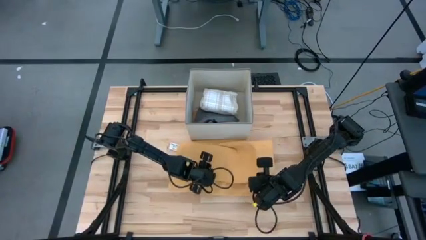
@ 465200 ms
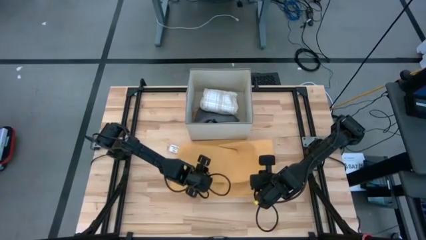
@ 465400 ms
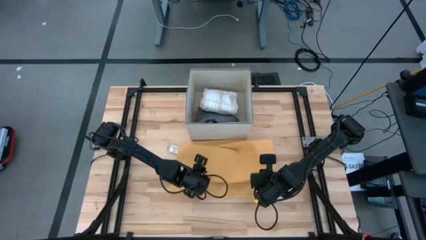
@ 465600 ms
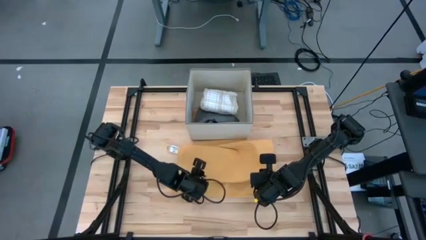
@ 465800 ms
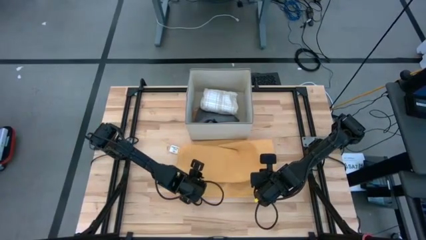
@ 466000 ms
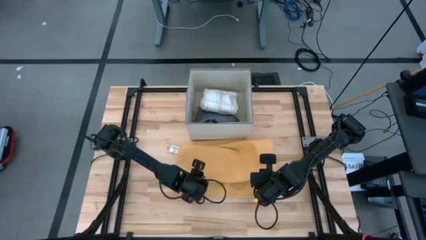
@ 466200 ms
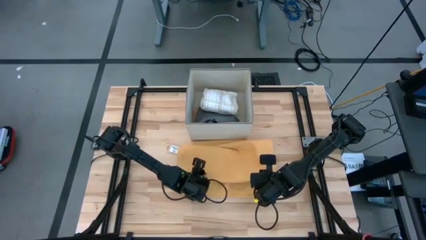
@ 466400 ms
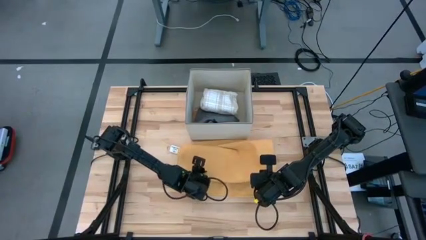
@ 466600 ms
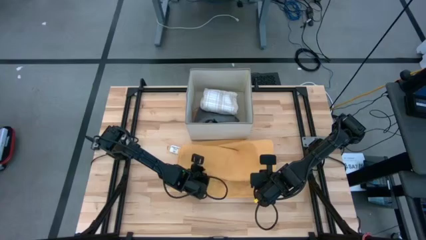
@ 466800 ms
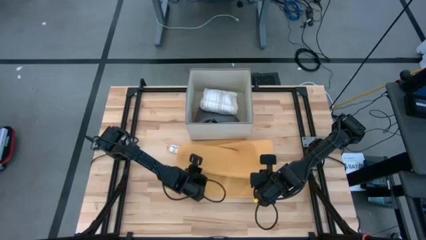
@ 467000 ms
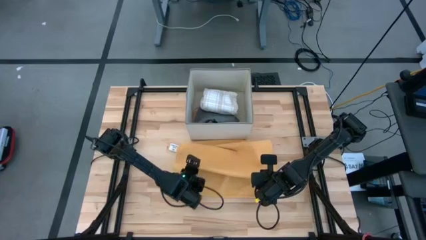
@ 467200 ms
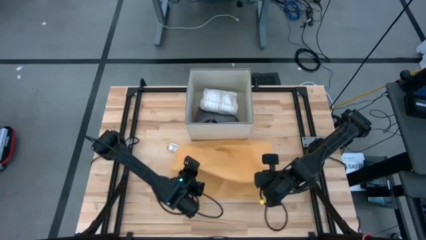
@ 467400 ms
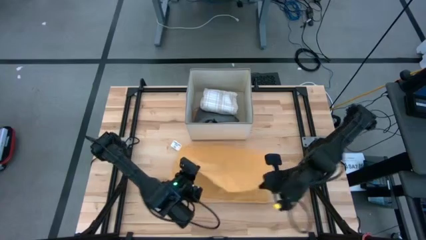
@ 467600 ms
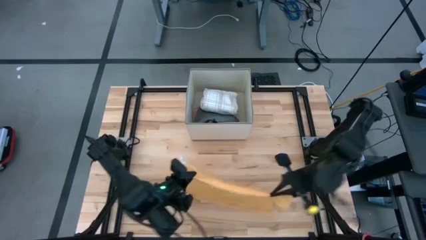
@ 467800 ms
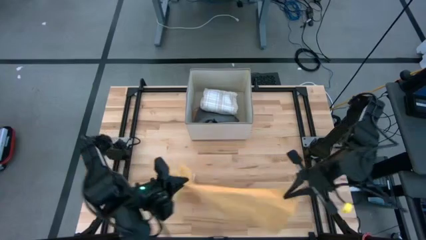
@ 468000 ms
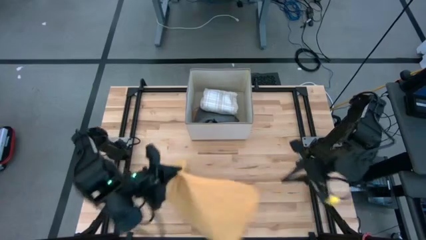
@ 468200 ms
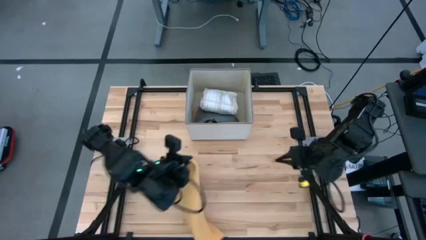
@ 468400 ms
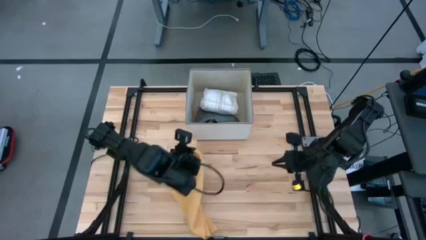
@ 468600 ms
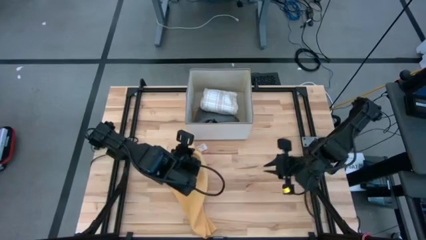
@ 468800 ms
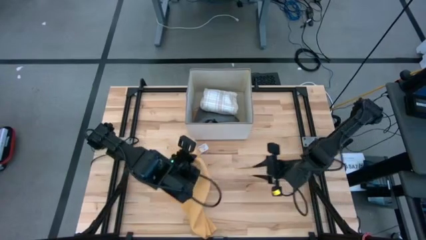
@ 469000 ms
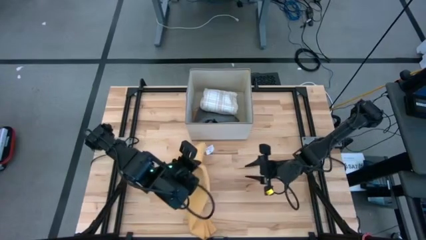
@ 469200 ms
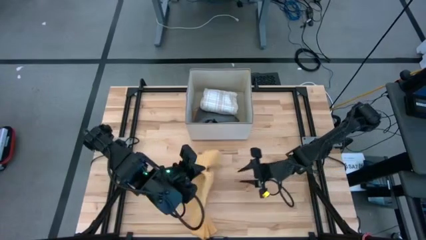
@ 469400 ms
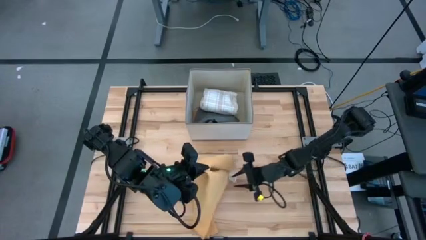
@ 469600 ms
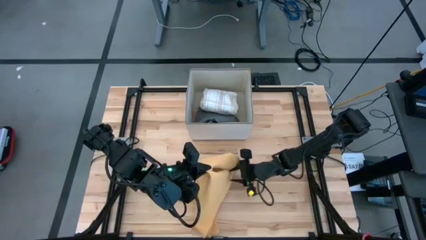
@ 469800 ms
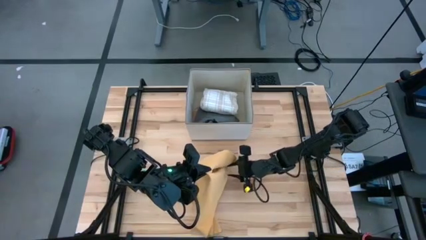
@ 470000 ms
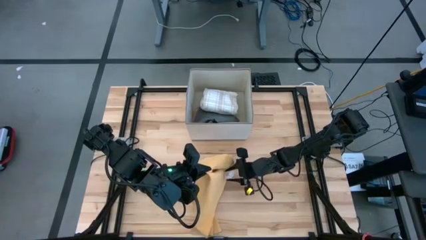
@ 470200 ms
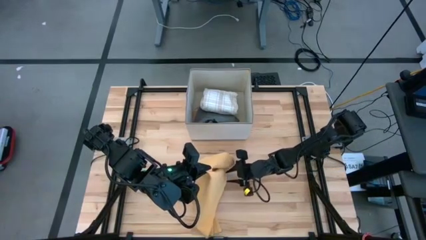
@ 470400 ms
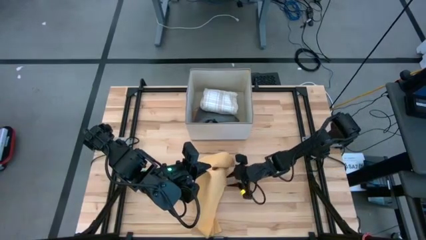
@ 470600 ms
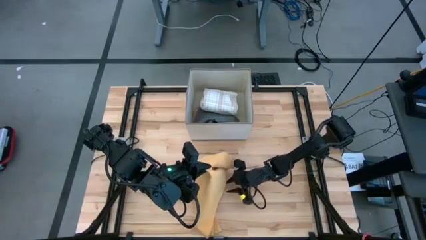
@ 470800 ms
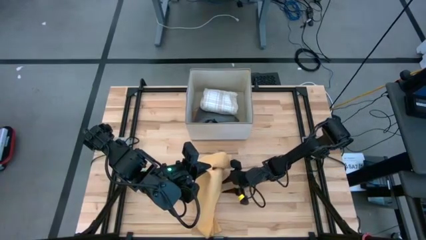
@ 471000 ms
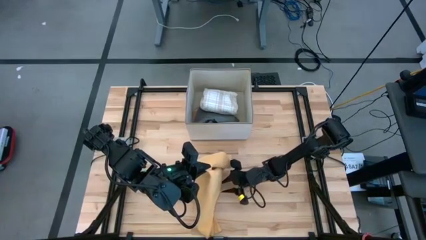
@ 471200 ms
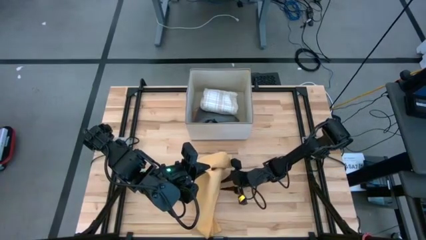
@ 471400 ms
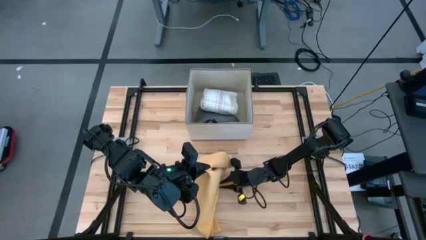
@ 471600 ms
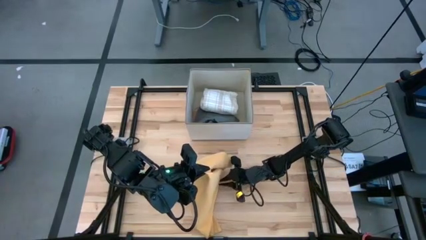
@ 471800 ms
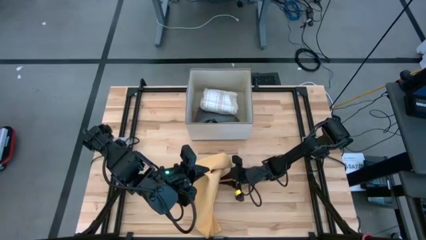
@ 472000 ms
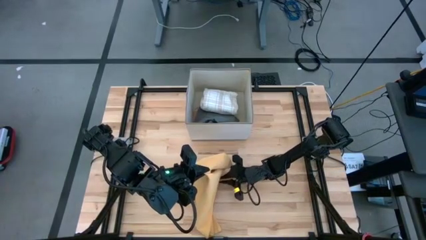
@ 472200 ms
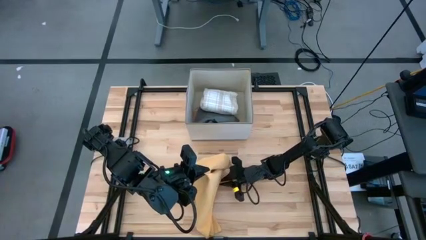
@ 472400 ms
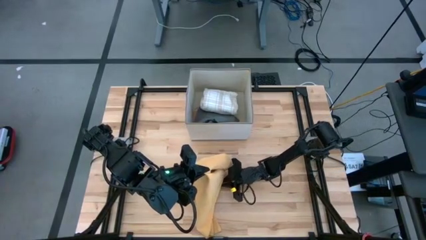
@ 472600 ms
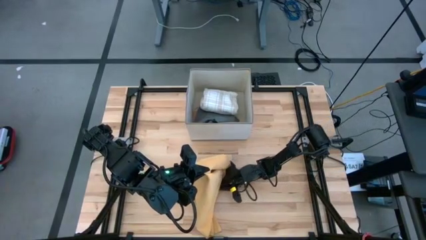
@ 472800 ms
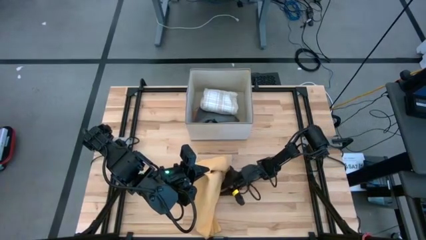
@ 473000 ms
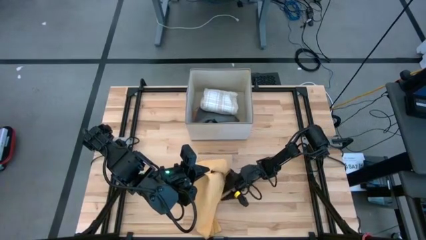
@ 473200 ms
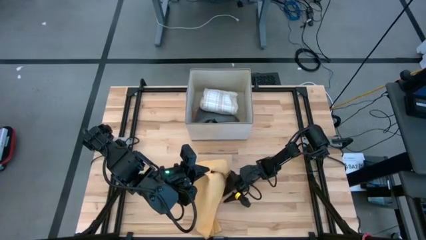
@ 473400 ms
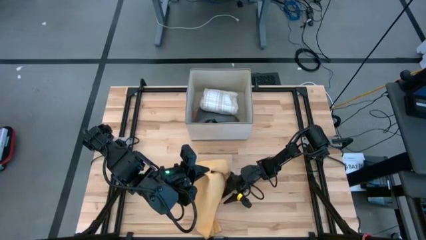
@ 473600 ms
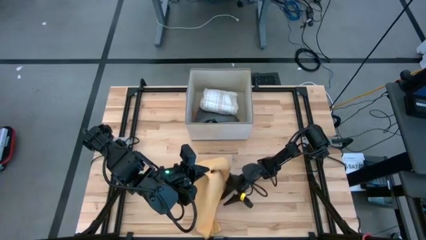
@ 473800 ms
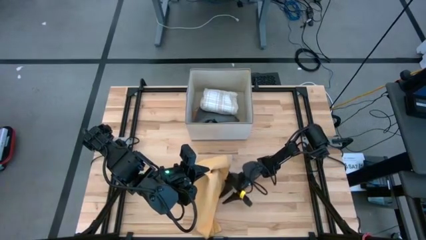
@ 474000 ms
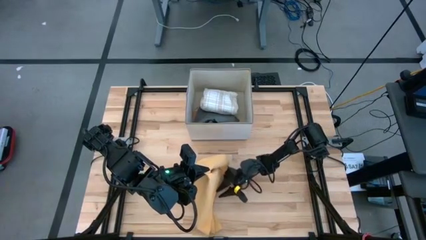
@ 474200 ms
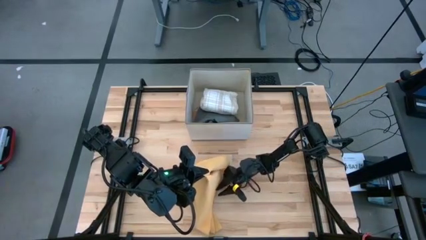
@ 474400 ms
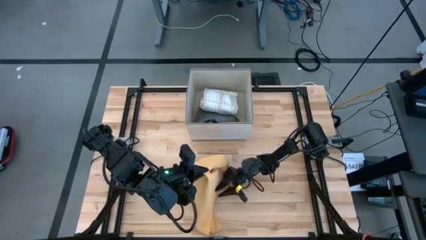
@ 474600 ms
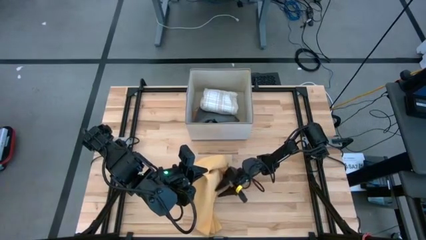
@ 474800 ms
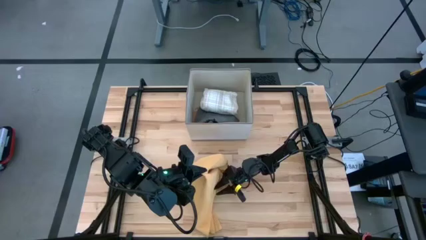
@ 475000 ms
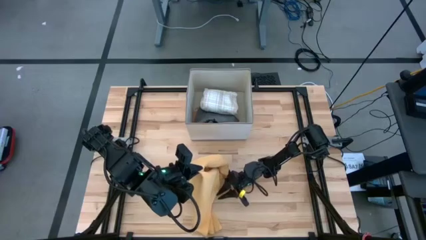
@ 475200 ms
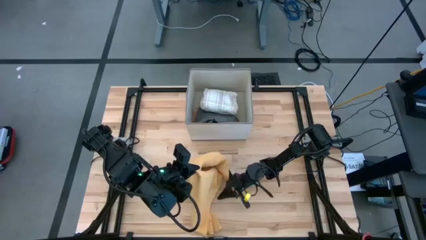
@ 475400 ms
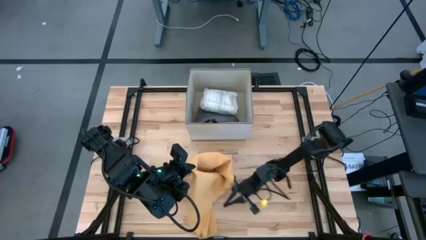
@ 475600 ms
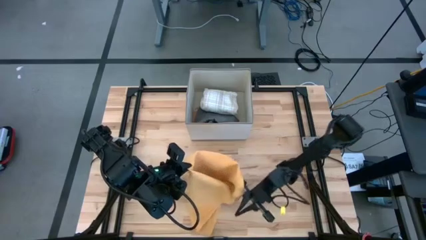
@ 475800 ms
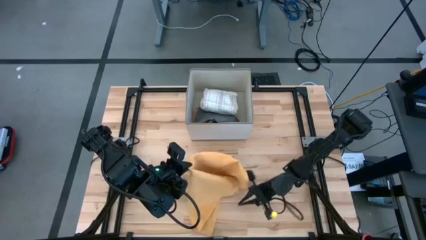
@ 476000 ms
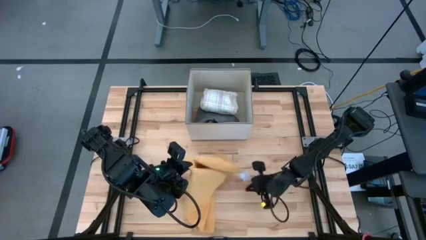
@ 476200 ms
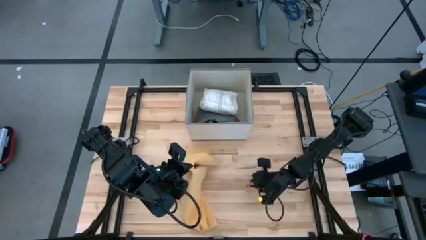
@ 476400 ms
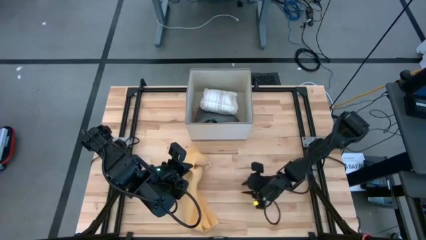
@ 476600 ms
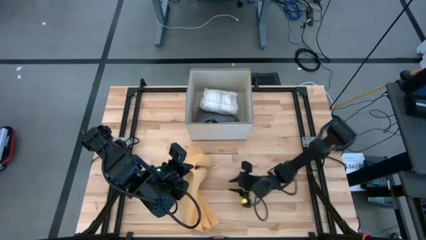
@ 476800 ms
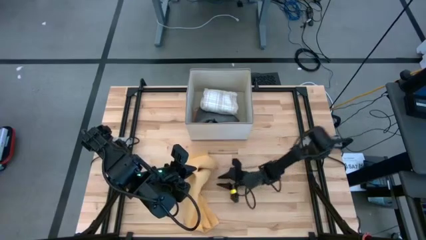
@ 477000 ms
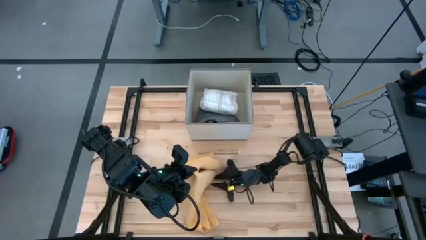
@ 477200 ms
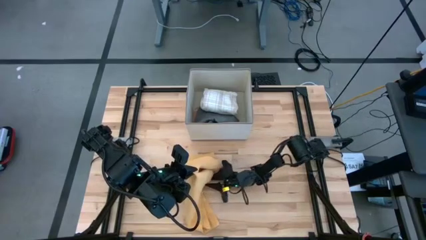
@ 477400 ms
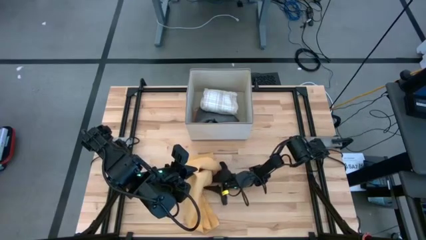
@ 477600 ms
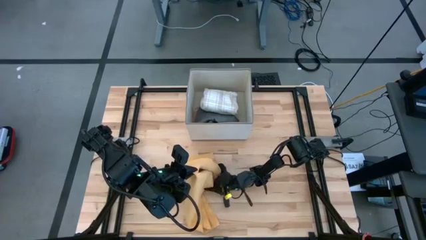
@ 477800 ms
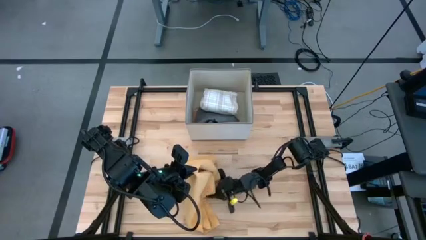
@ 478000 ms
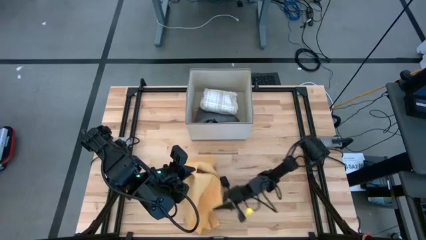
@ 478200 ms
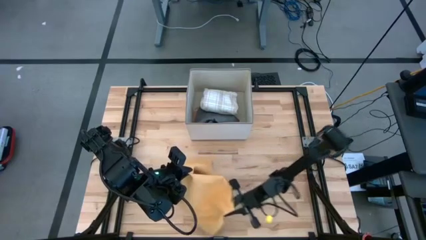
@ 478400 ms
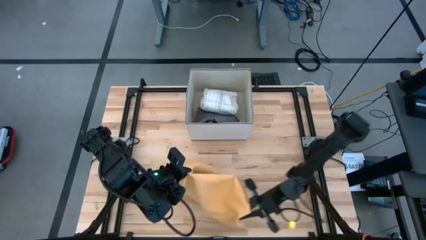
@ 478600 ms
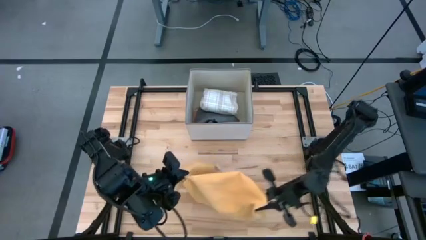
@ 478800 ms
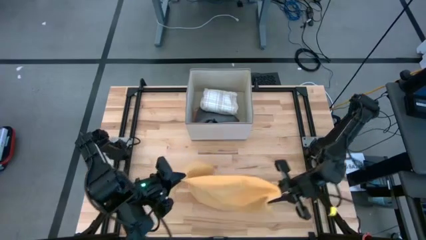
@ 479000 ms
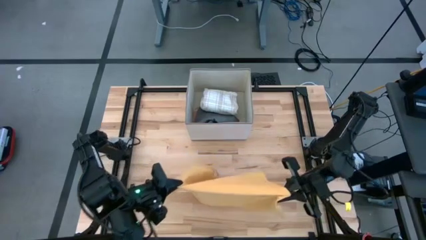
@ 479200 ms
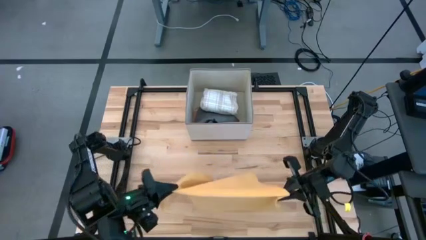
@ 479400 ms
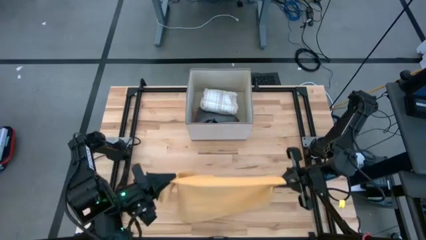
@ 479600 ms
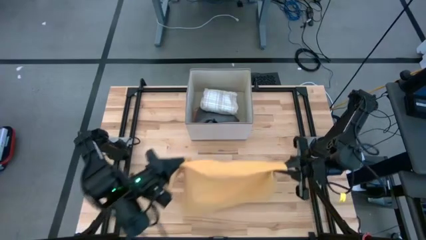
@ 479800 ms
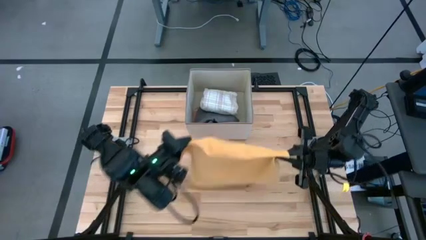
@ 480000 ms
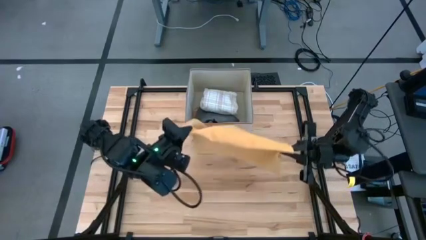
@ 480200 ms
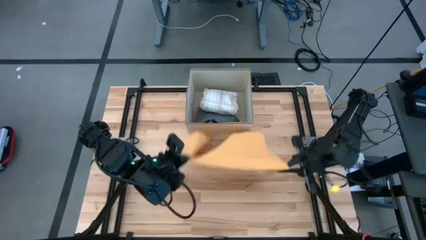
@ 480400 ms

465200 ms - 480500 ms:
Task: Fold towel
Fold the orange towel
